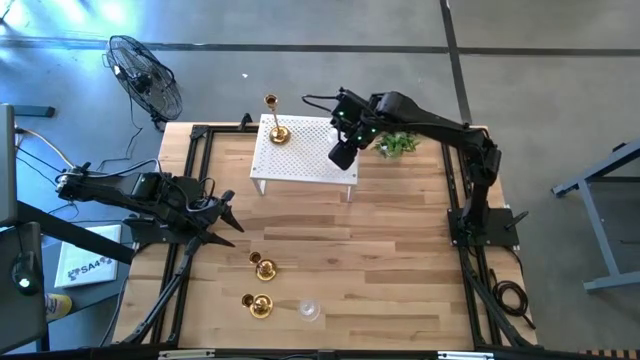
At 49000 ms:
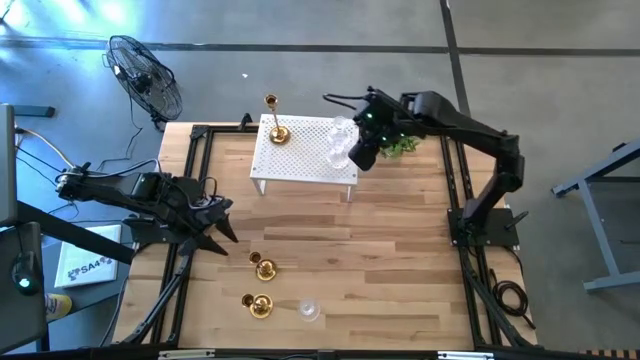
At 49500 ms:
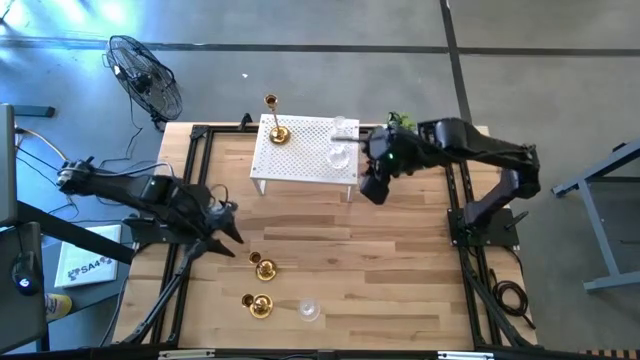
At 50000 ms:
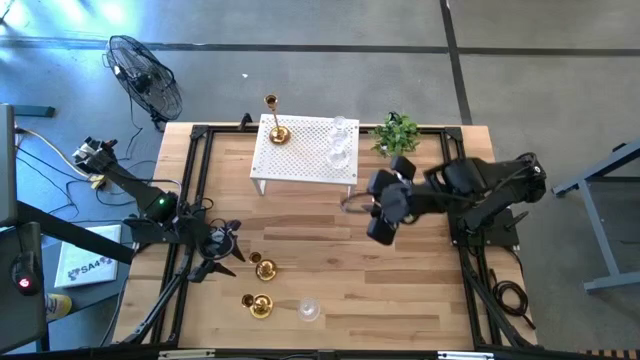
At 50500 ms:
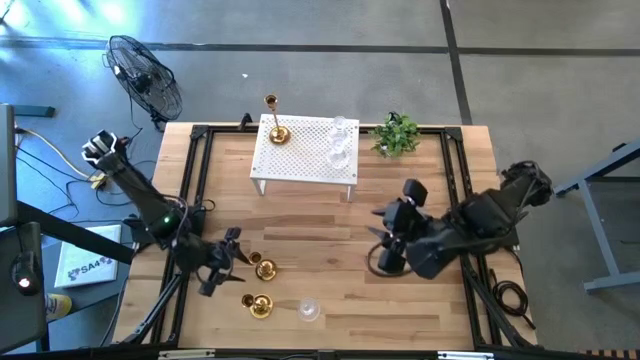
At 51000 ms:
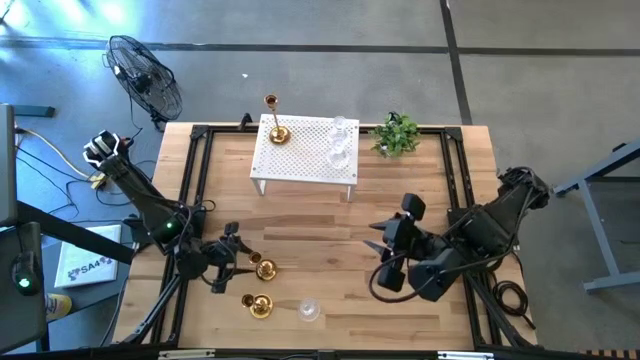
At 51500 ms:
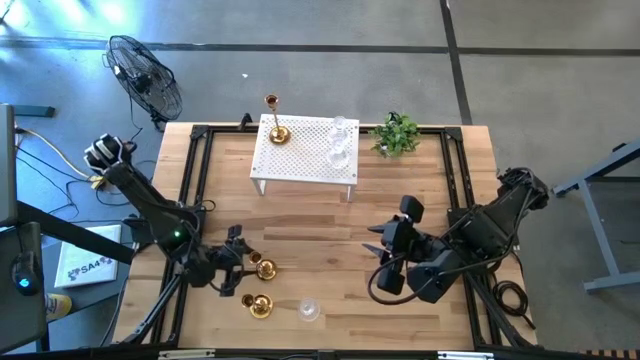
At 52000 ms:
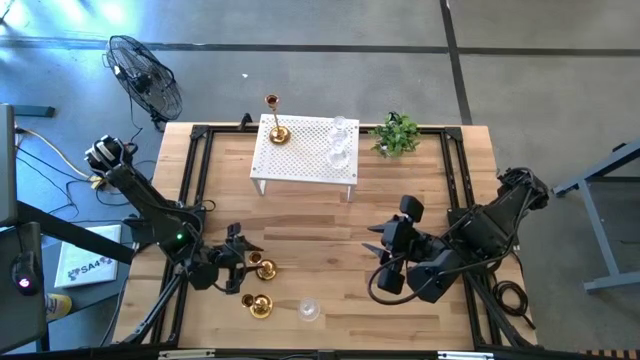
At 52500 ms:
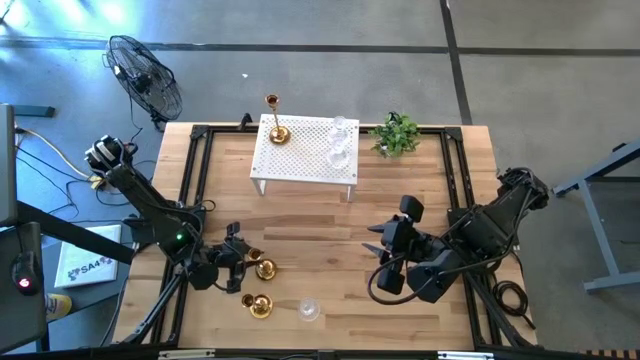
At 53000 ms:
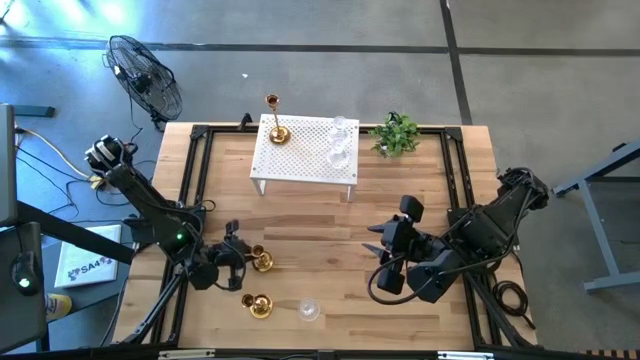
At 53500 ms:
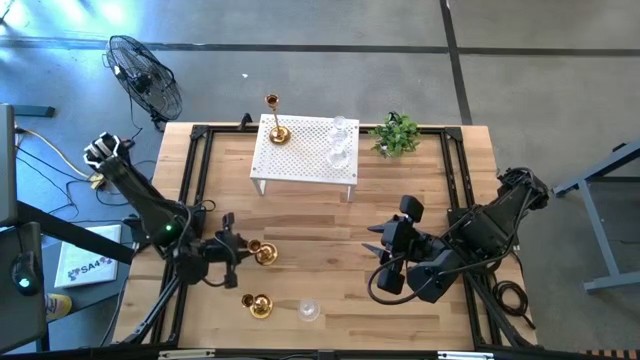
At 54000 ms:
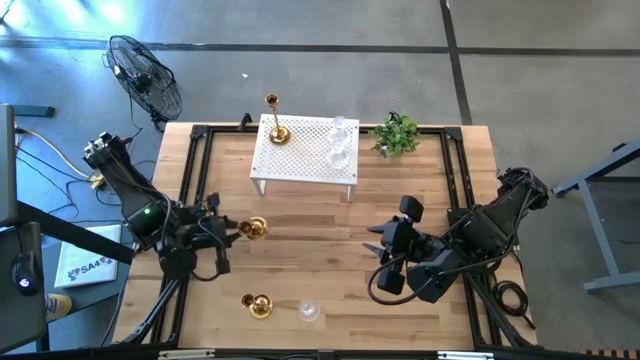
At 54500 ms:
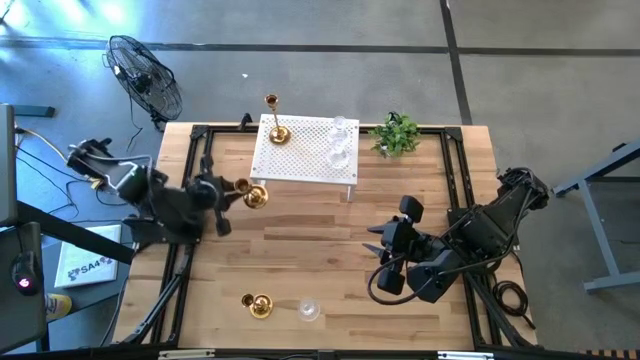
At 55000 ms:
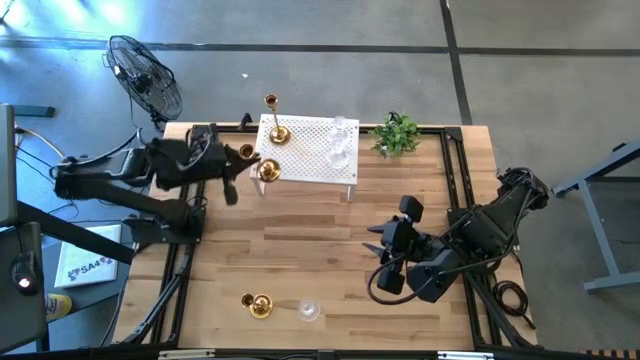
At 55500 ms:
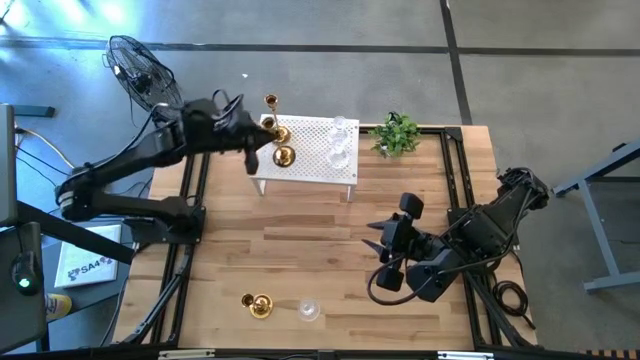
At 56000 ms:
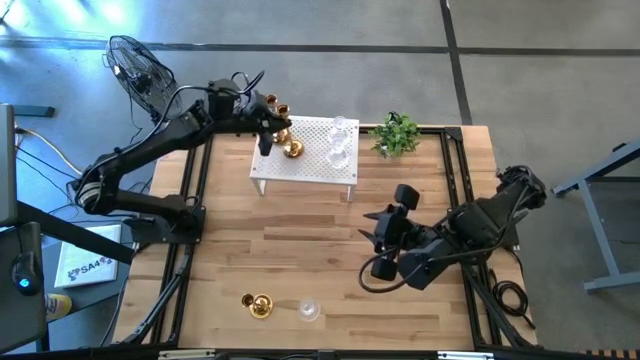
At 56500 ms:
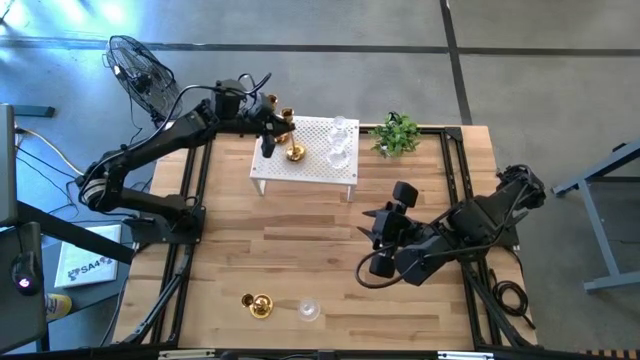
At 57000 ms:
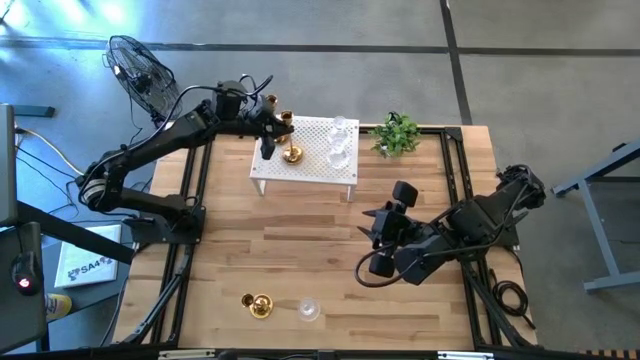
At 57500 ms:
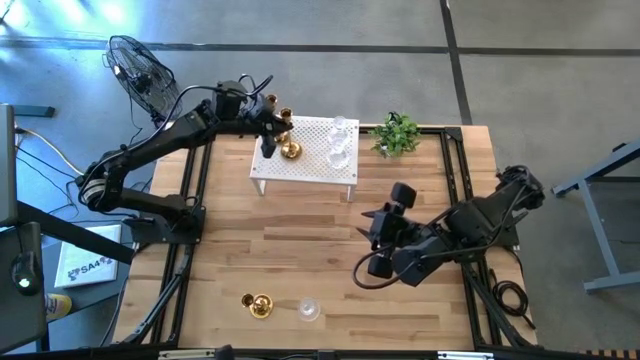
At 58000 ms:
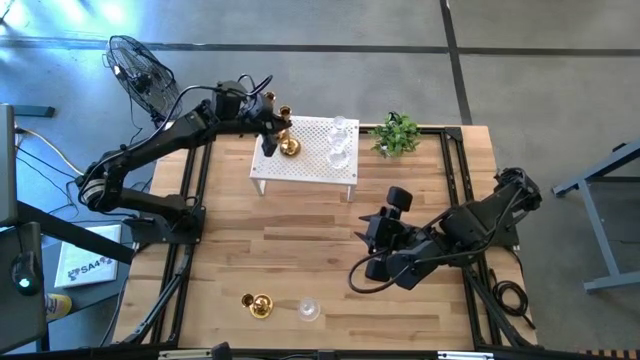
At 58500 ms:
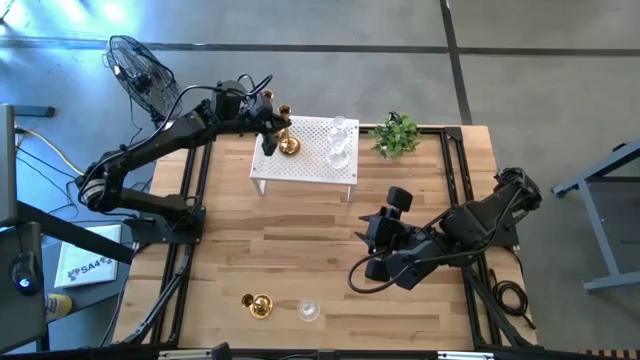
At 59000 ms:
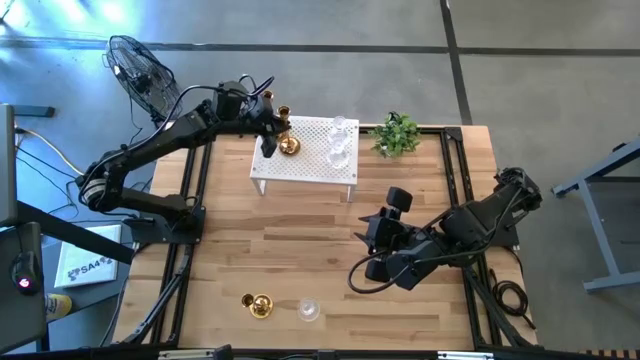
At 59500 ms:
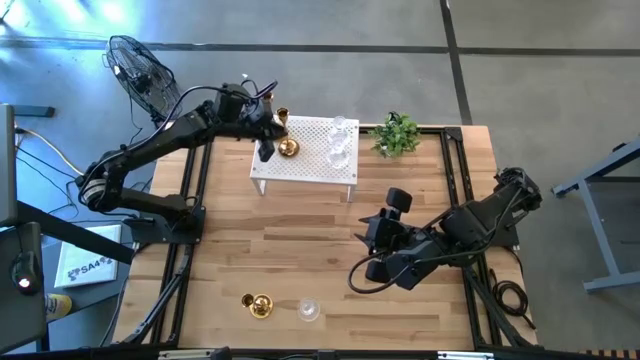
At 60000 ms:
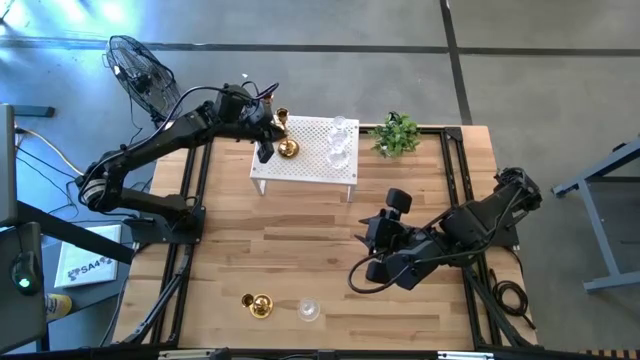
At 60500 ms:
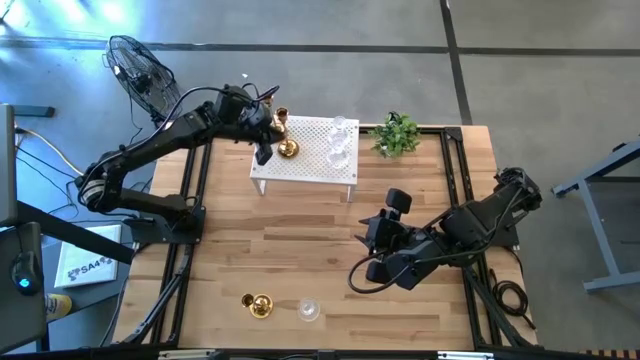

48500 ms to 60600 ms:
Task: Pick & Place candle stick holders
Put the top gold candle holder on the shelf aligned with the other gold candle holder

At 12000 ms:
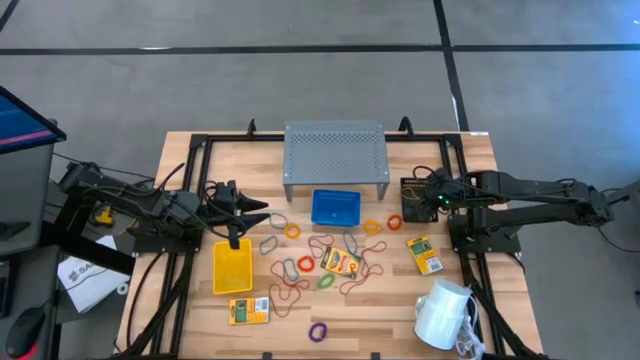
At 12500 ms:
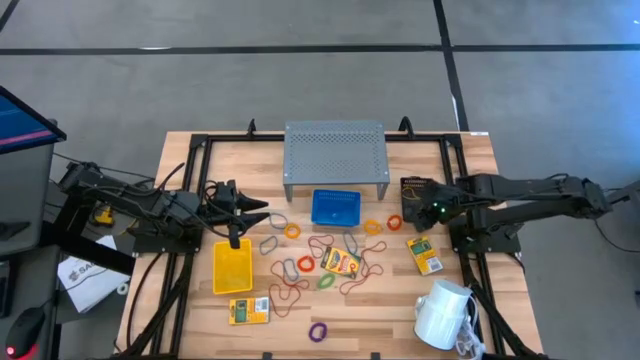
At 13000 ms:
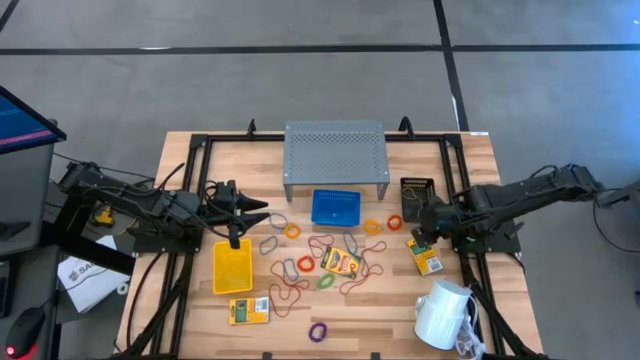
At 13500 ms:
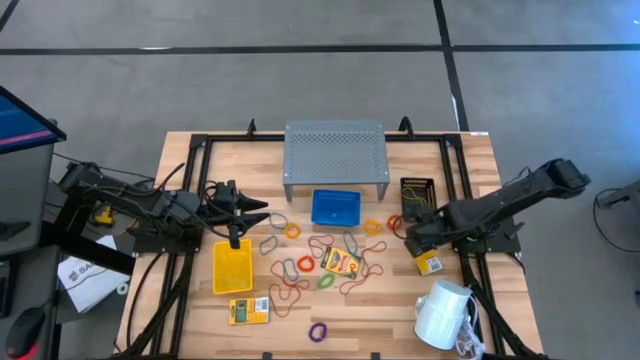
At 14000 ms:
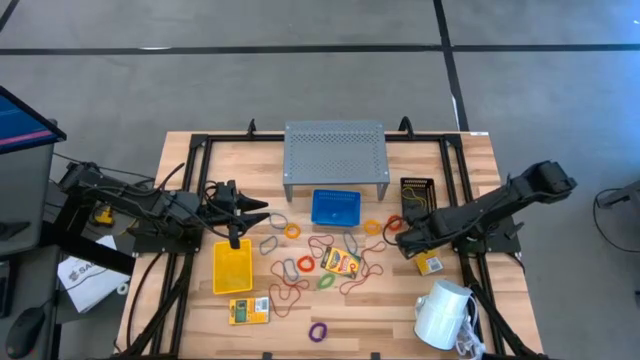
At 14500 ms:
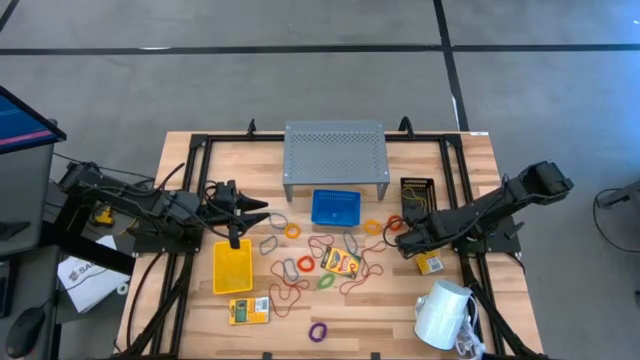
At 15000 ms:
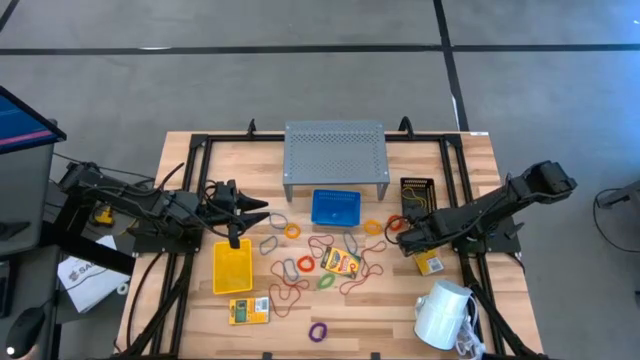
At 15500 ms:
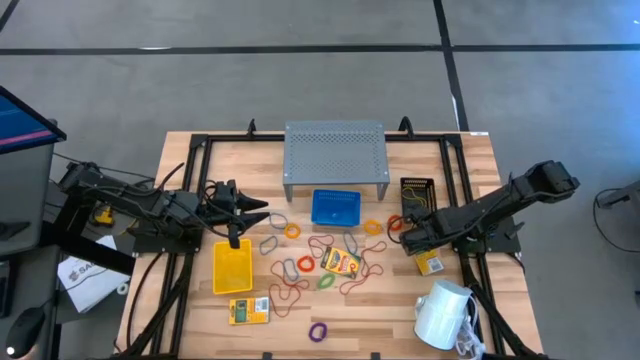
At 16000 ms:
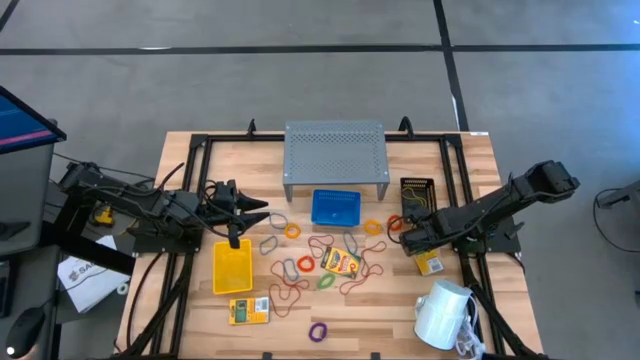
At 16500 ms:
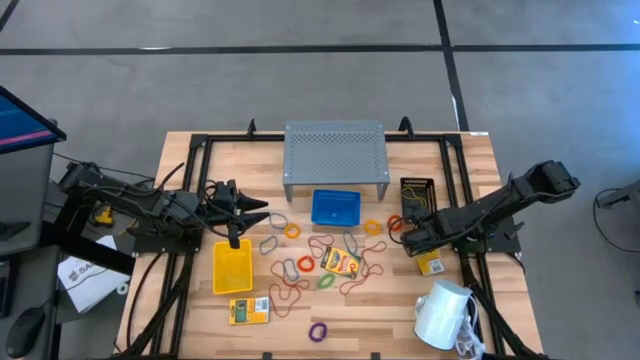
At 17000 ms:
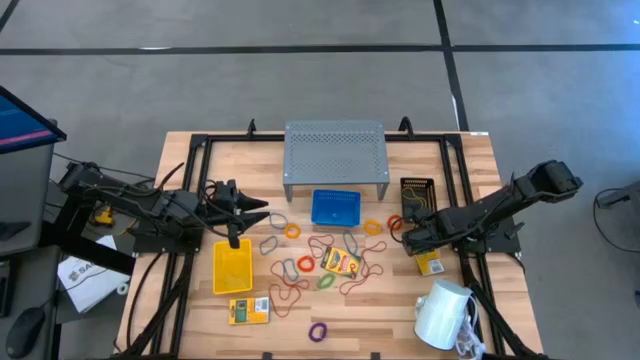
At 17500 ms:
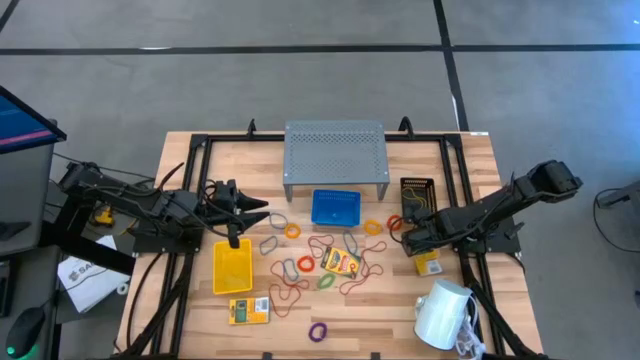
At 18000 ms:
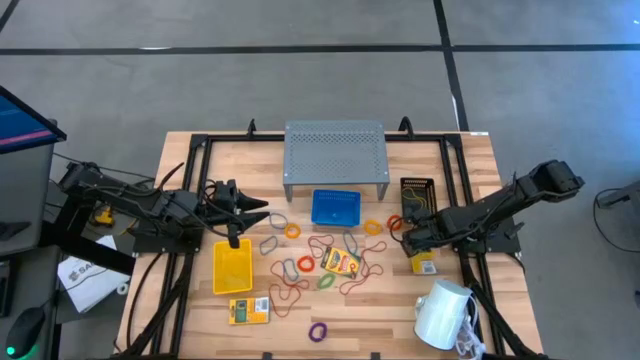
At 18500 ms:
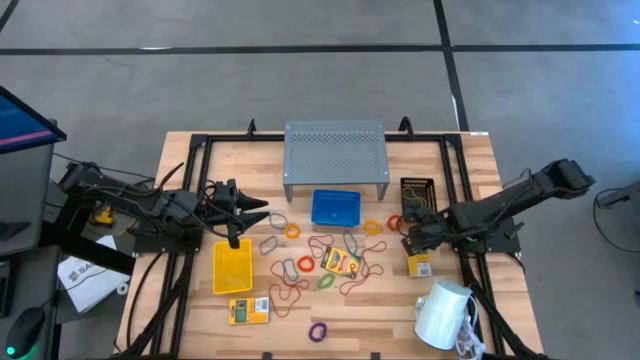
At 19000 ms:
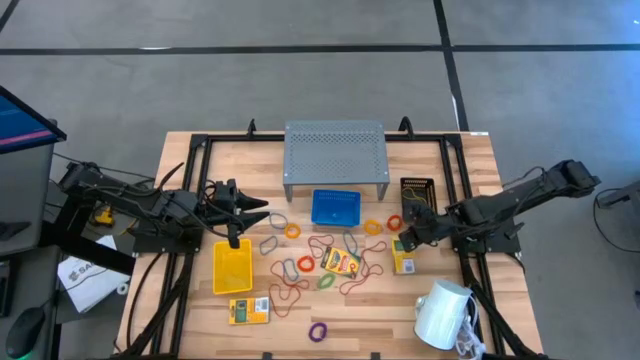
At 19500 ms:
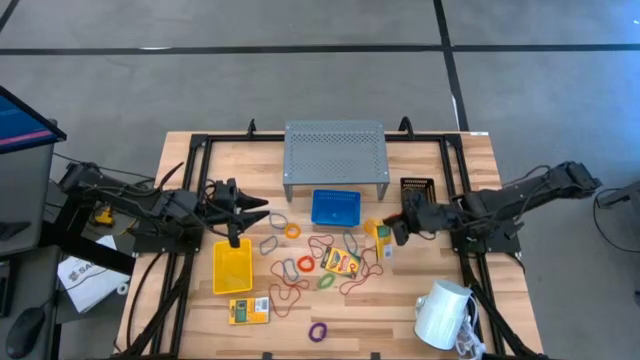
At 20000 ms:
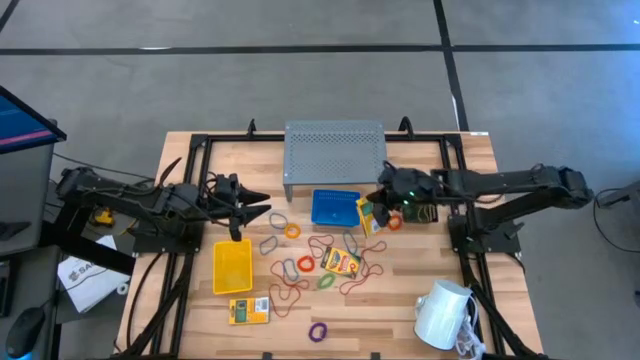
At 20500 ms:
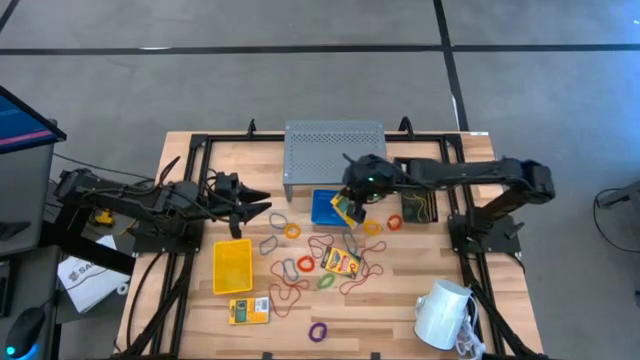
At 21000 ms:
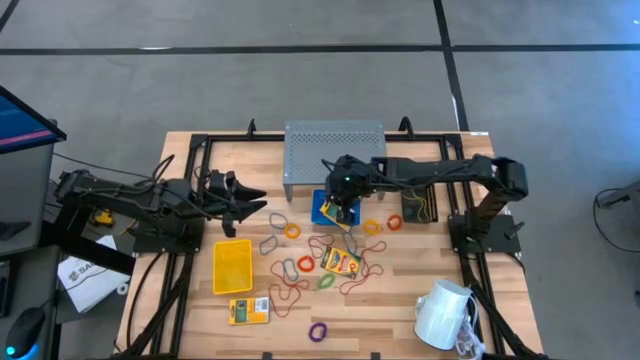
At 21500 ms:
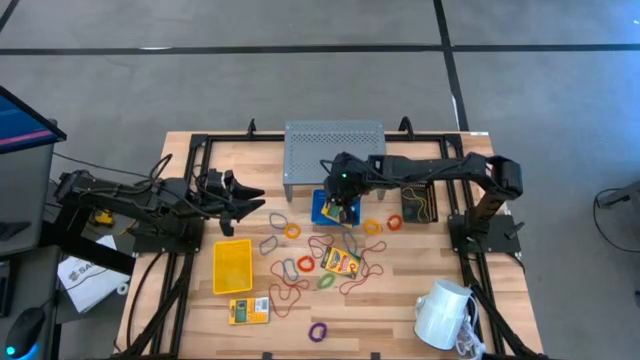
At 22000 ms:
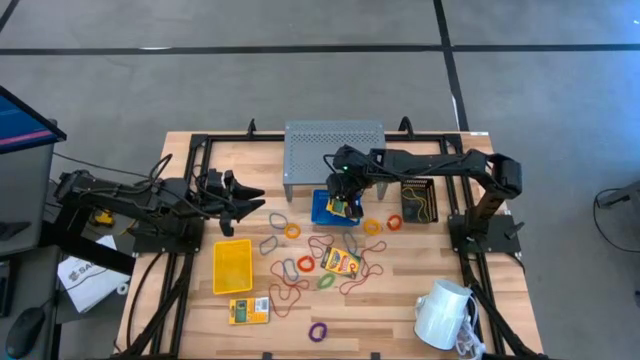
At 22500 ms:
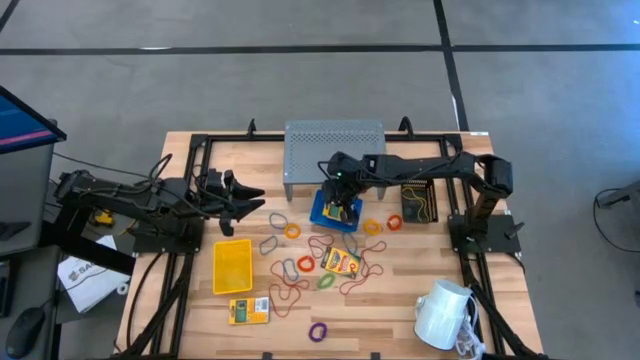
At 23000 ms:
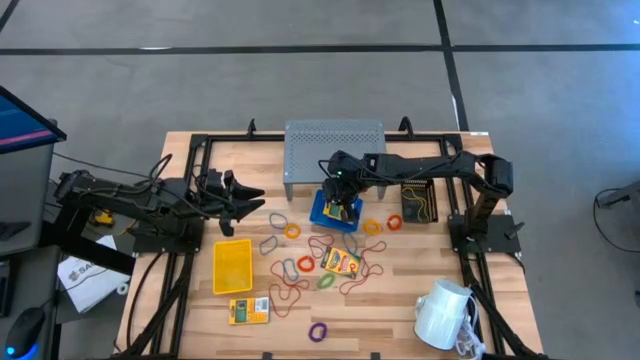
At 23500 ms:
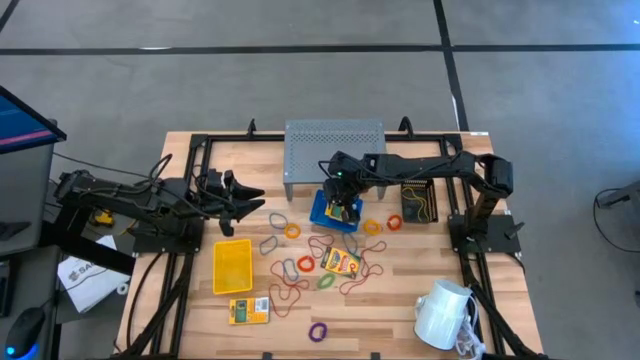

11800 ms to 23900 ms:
Task: Pick & Place Office Desk Supplies
Put the yellow crayon box into the blue bin
